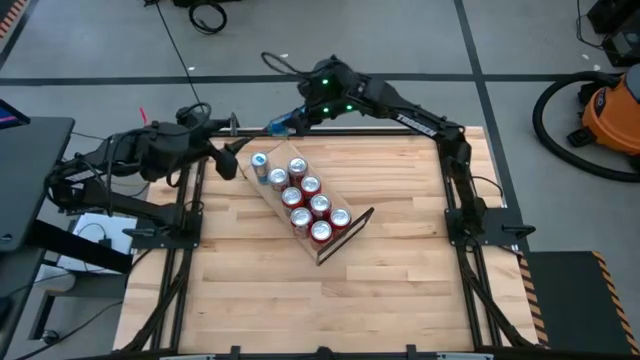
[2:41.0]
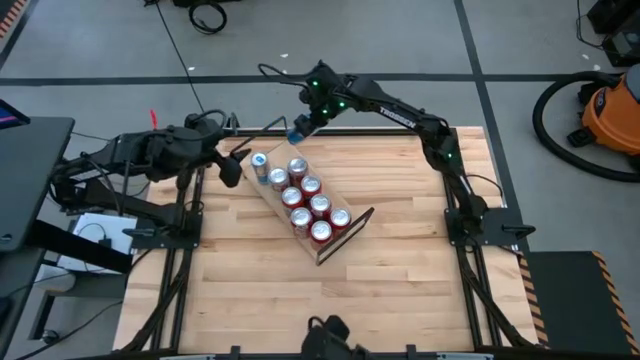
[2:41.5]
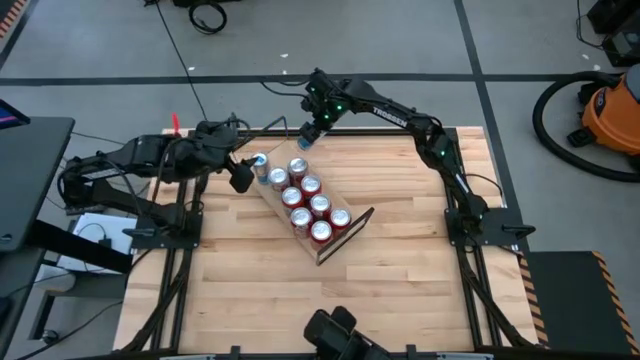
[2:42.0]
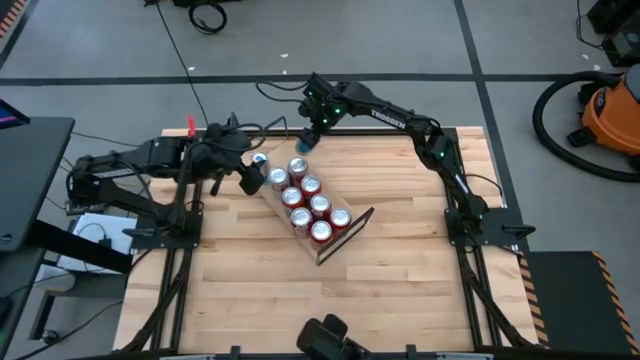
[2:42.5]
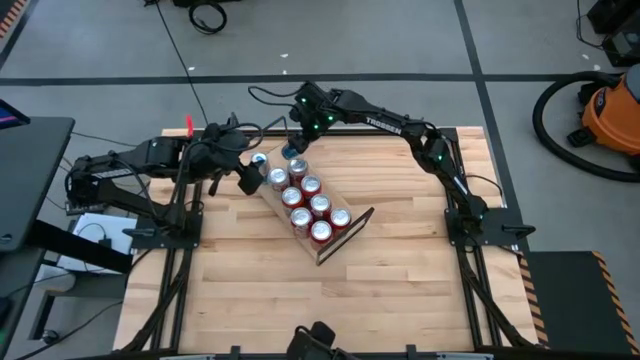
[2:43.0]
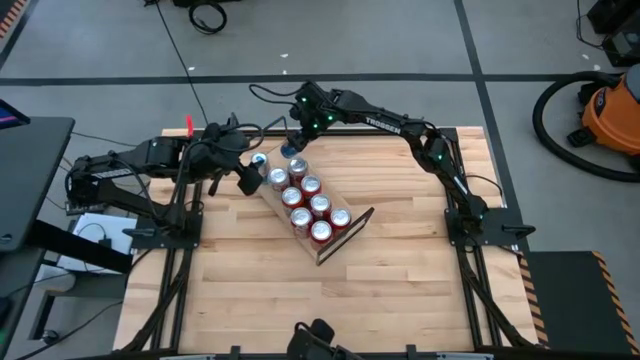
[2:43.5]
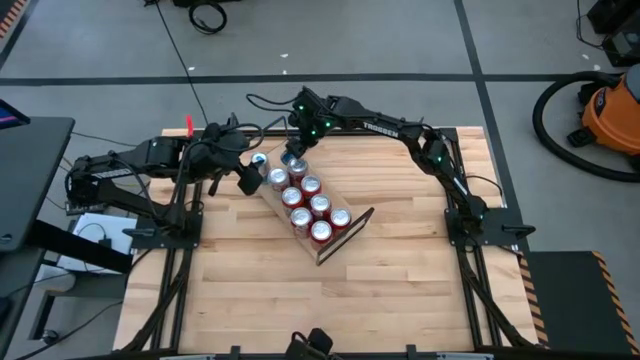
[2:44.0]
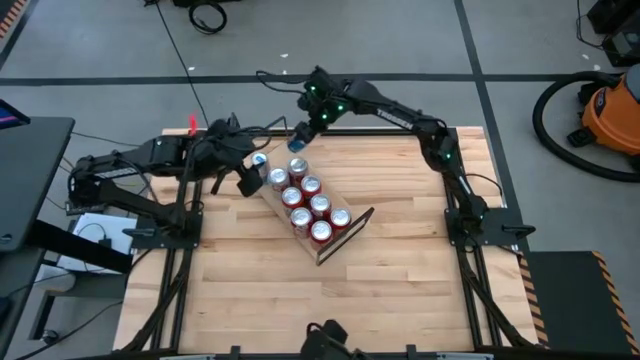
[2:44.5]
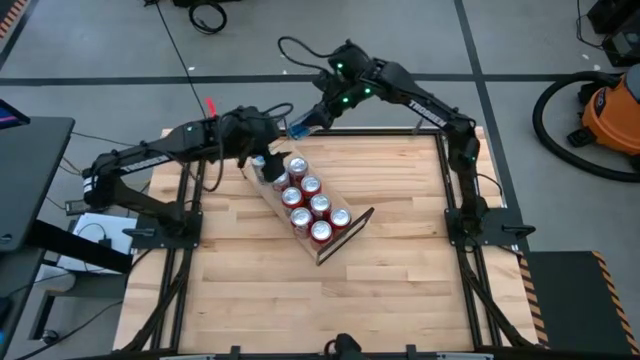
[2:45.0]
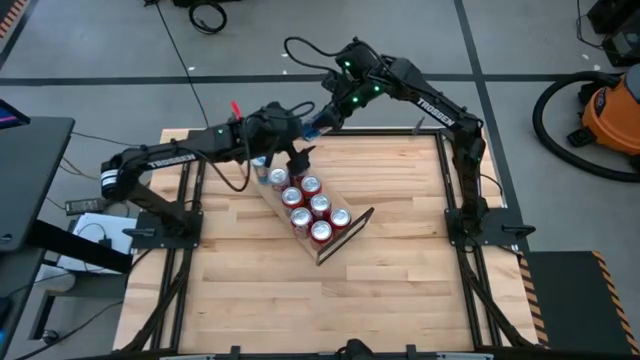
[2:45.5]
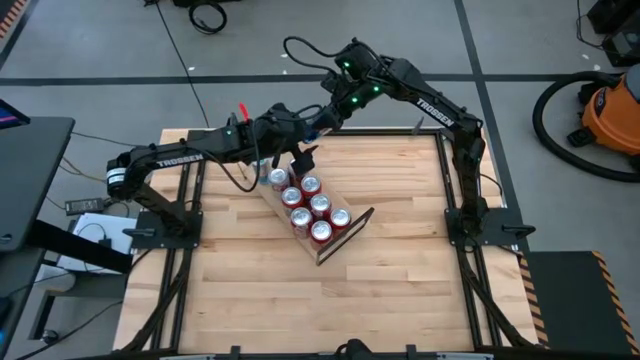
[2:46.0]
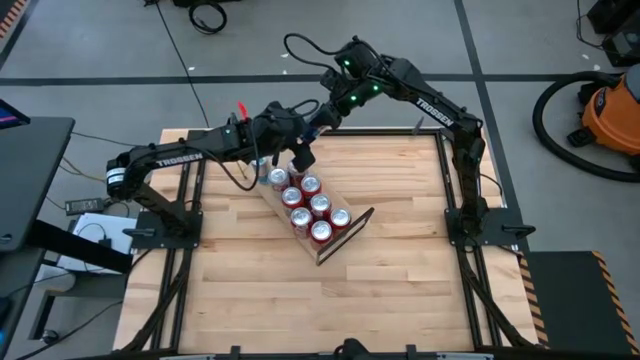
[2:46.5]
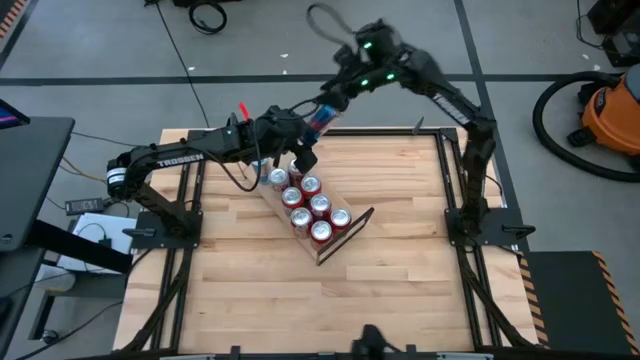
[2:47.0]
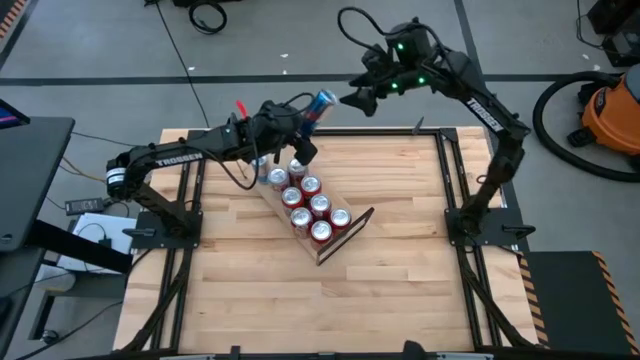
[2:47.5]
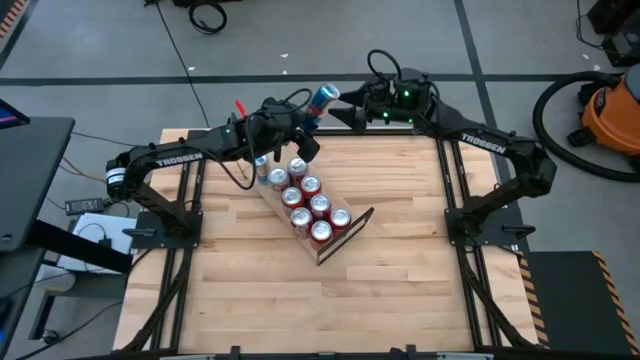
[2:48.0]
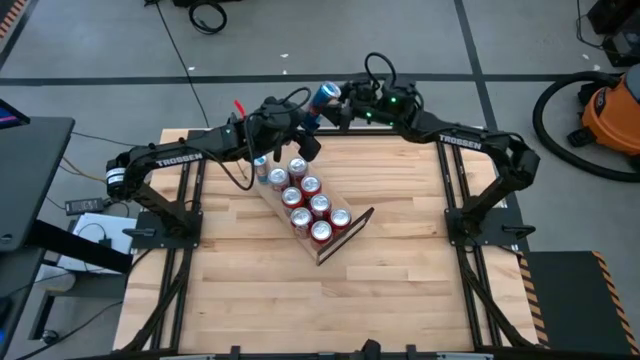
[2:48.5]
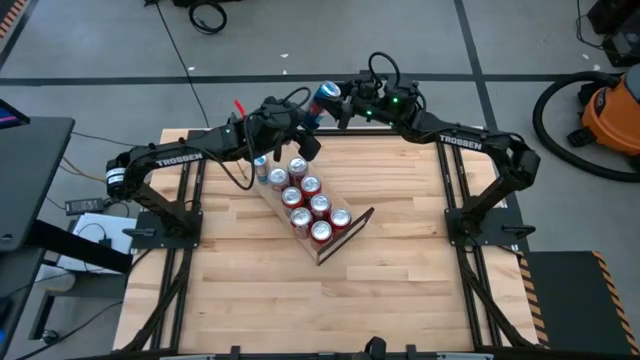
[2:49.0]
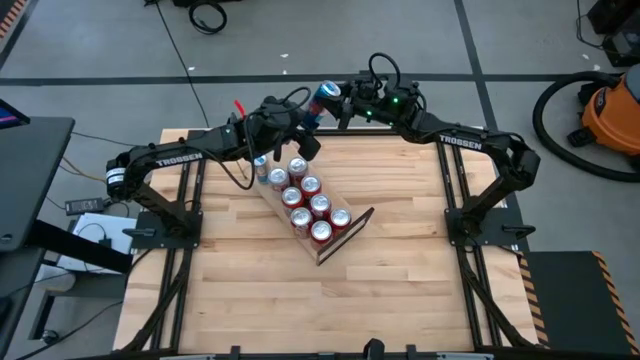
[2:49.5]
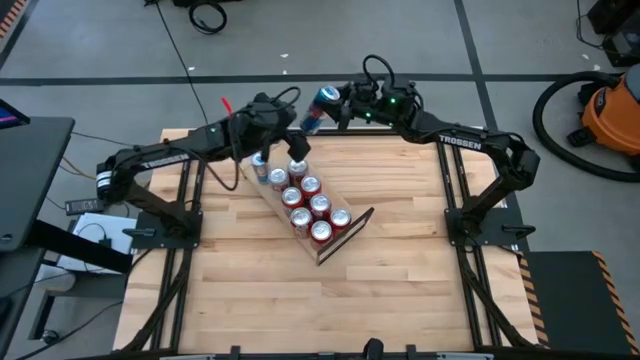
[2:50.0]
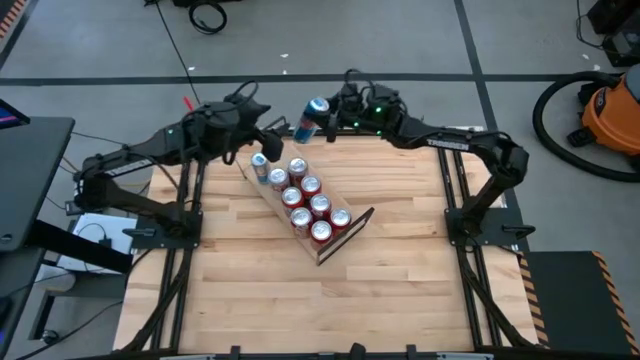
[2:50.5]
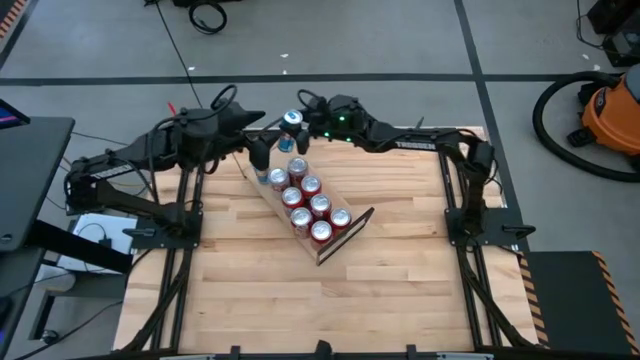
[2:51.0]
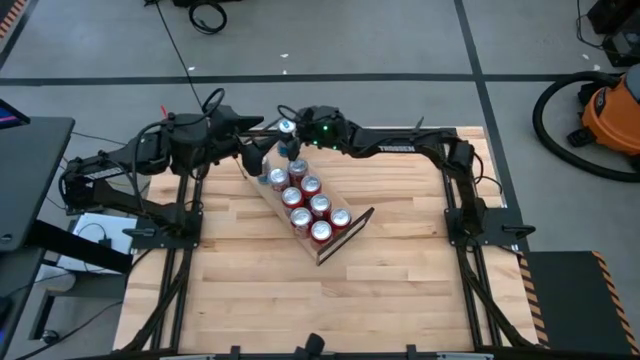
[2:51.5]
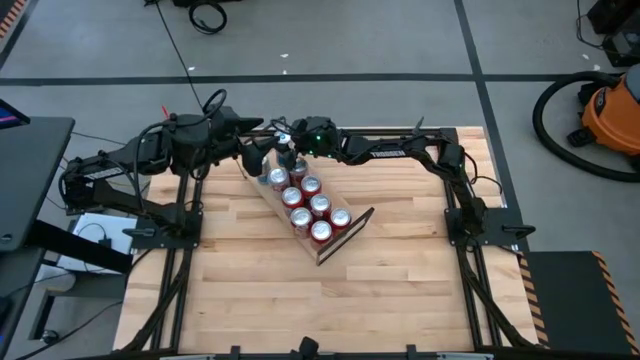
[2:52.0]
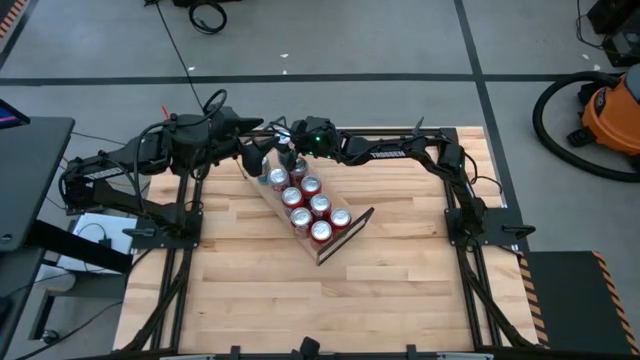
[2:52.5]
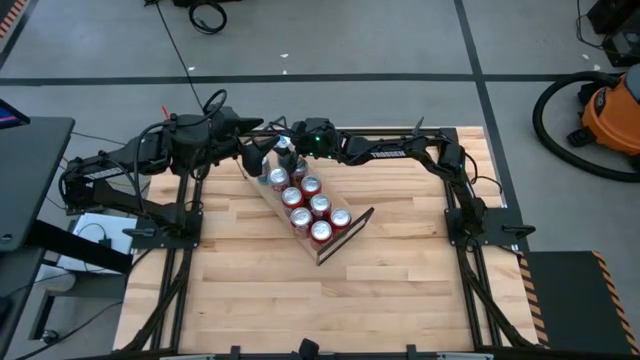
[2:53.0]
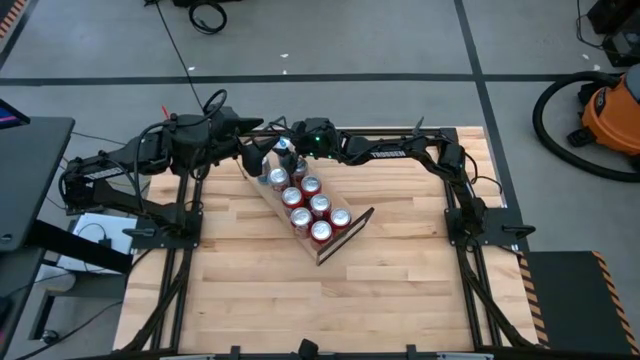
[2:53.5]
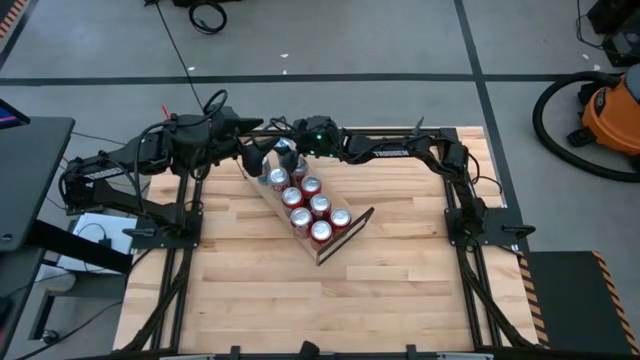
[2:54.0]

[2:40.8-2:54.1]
Task: Place canned beverage on shelf
Put the blue soda can on the shelf aligned with the other blue soda can

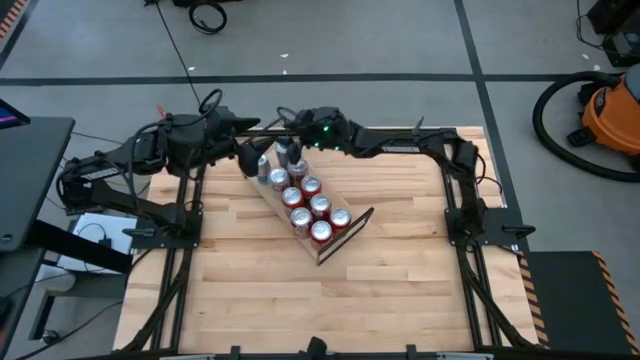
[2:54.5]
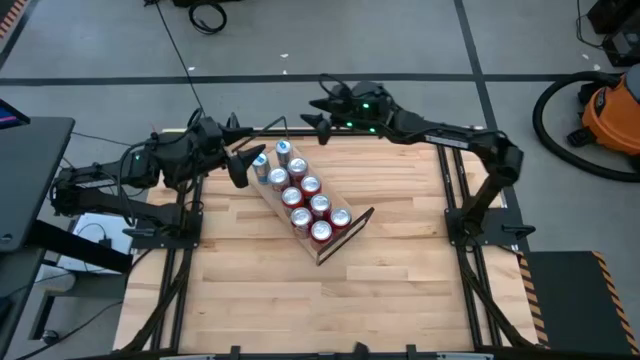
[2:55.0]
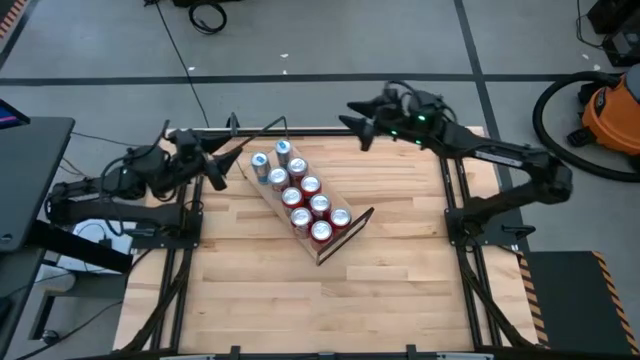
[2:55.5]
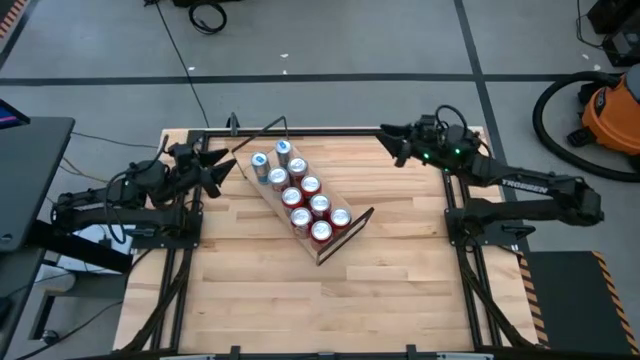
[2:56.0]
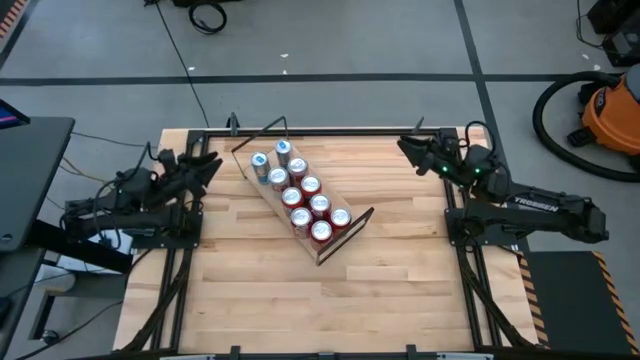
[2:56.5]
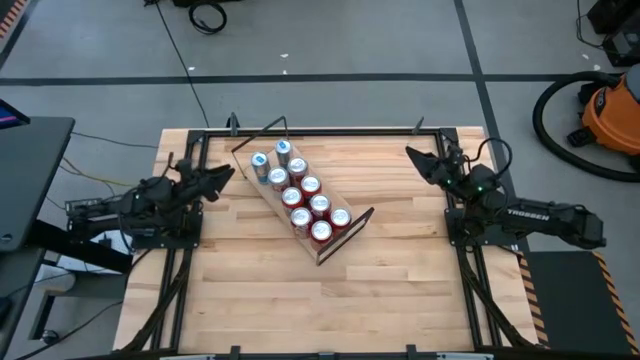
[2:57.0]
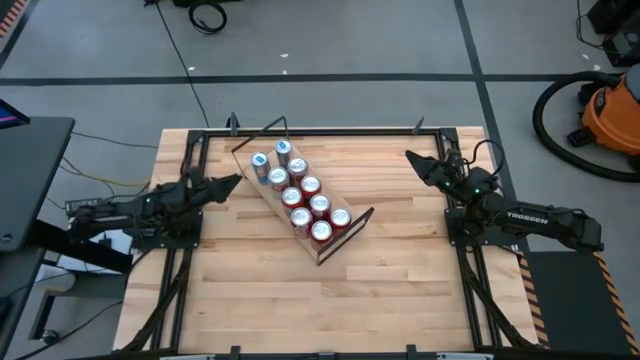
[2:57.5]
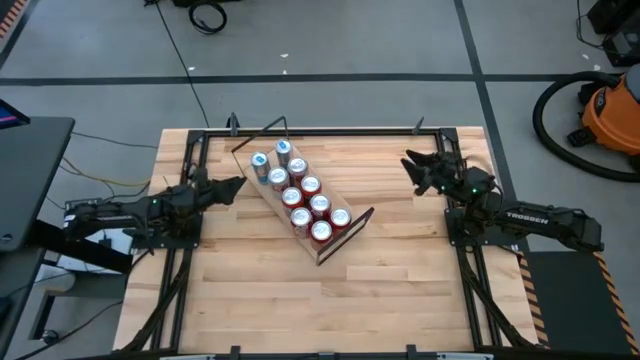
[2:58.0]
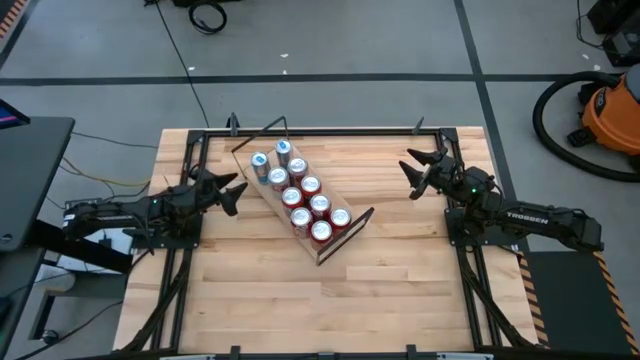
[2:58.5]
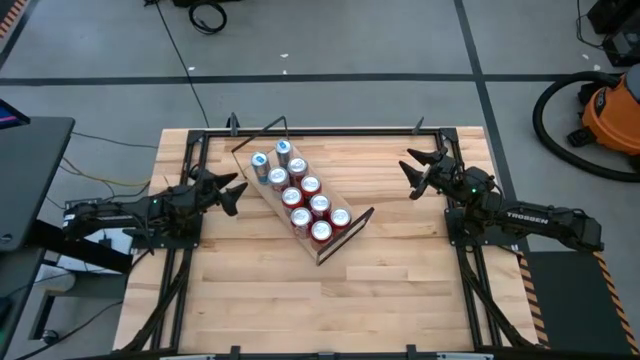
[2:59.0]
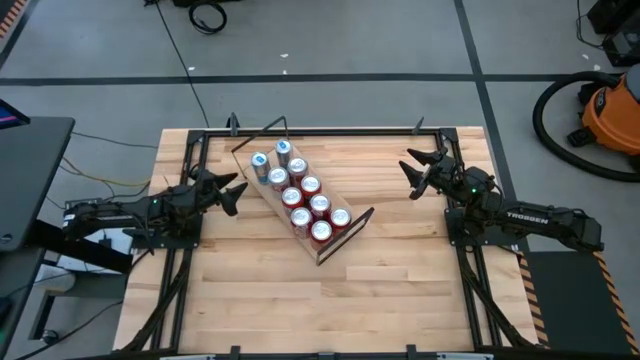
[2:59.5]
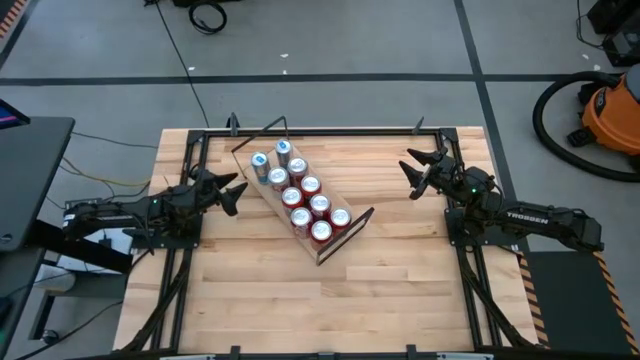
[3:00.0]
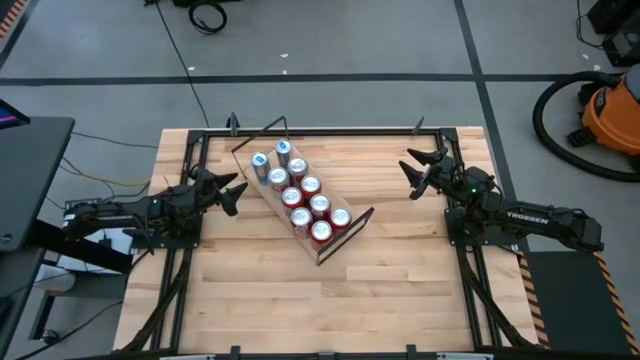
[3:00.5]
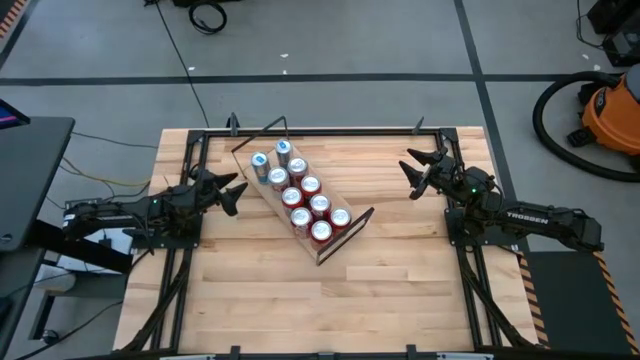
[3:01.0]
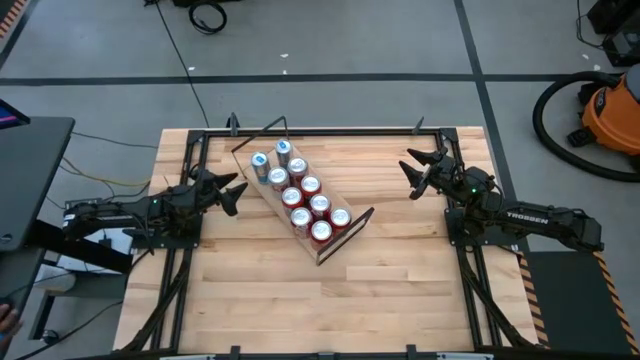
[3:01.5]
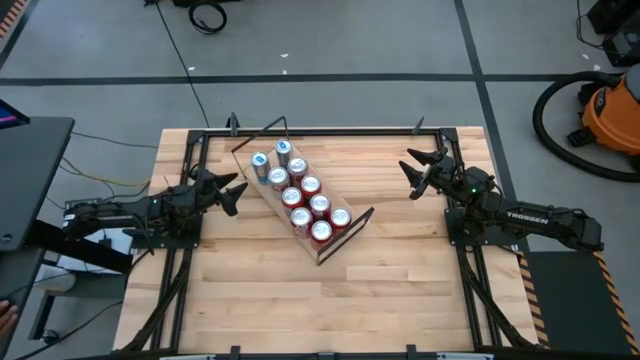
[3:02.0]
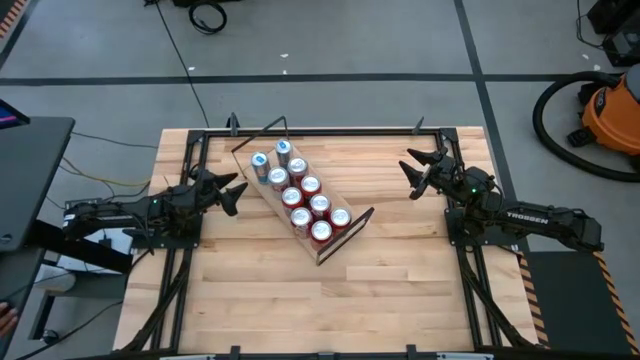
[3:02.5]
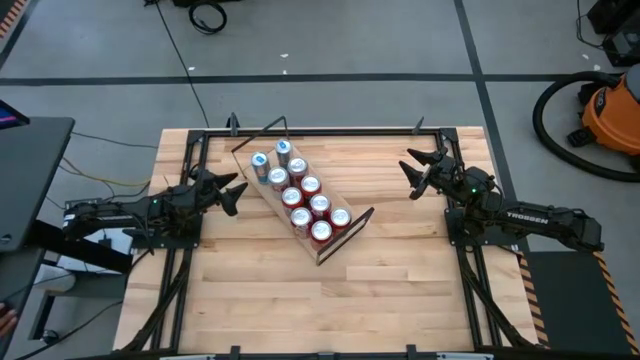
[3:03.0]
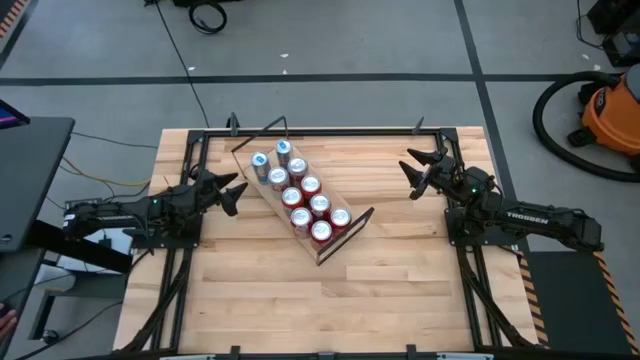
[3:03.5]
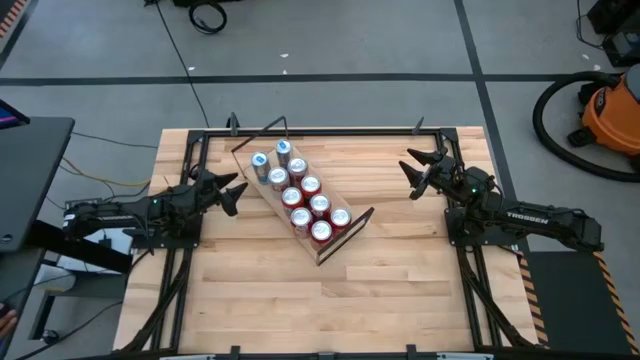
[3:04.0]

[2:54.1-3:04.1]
Return to Home Position
